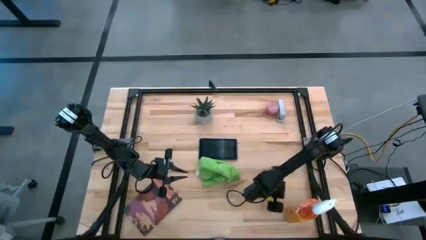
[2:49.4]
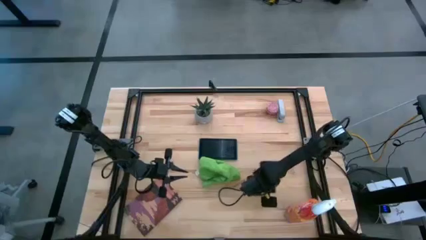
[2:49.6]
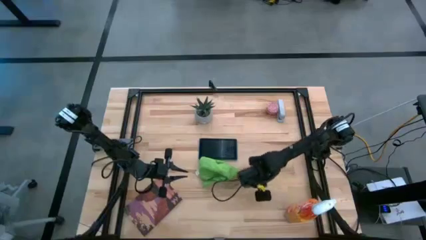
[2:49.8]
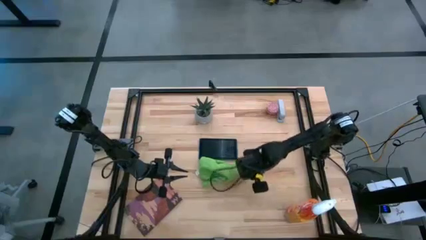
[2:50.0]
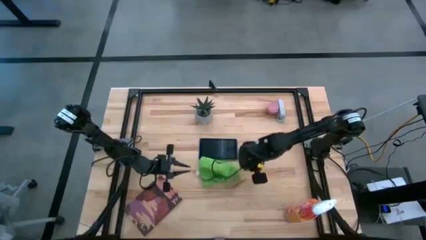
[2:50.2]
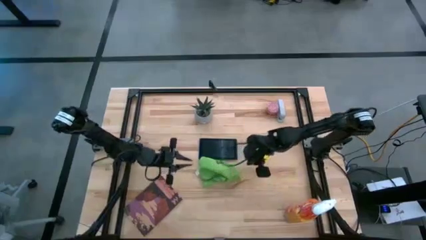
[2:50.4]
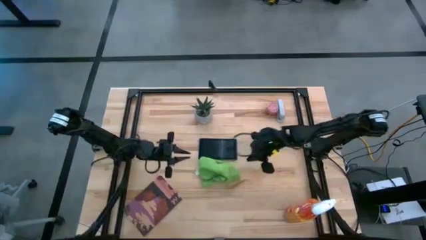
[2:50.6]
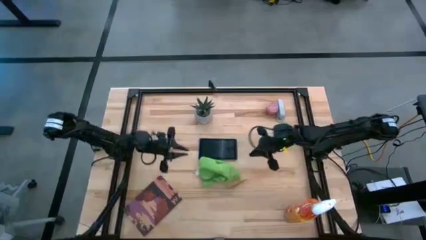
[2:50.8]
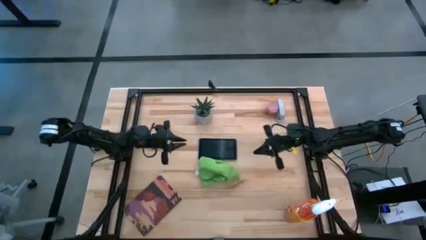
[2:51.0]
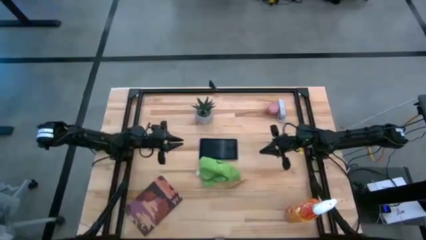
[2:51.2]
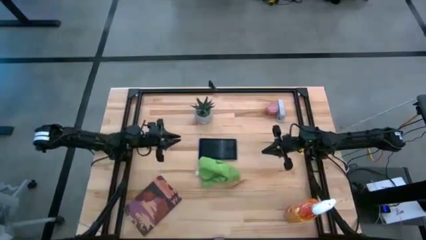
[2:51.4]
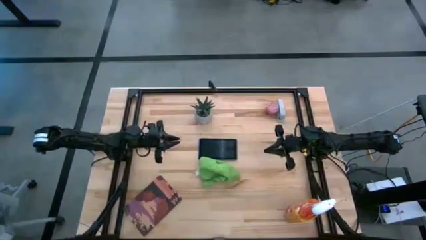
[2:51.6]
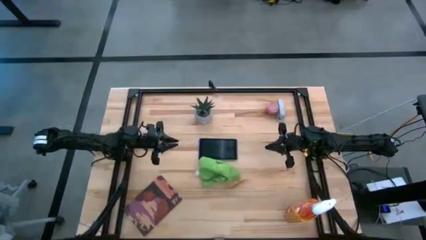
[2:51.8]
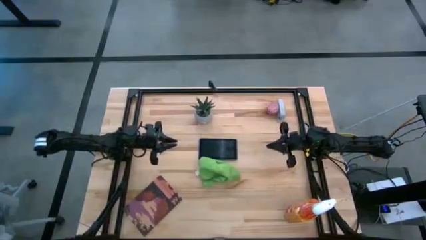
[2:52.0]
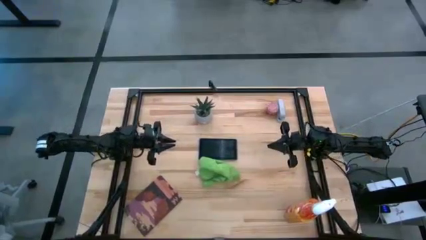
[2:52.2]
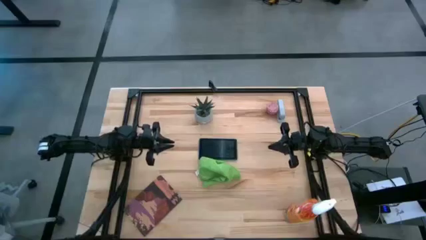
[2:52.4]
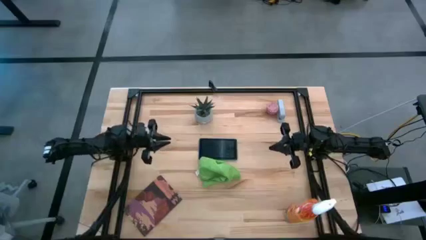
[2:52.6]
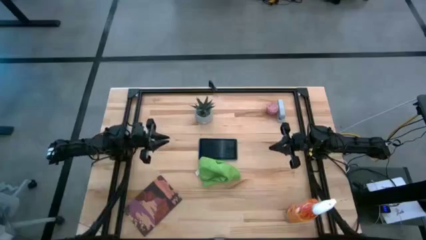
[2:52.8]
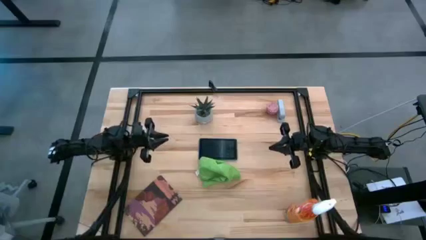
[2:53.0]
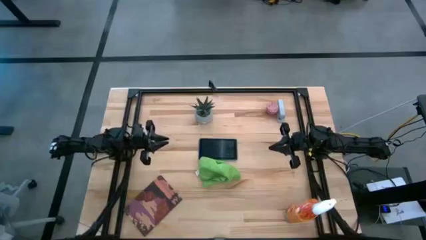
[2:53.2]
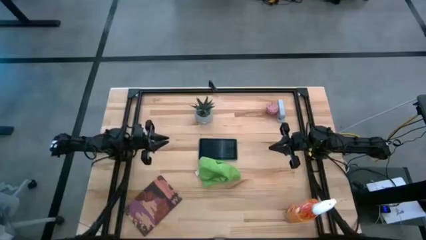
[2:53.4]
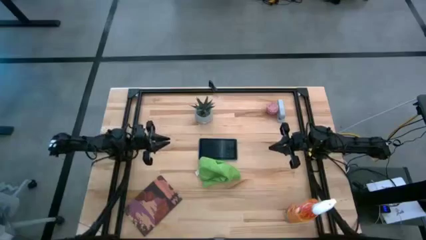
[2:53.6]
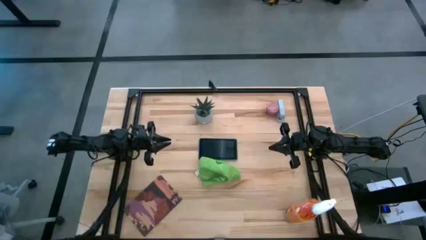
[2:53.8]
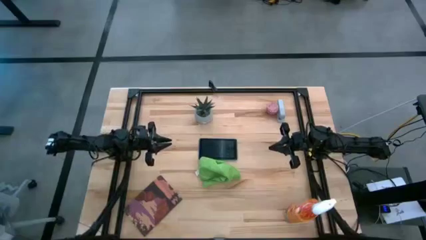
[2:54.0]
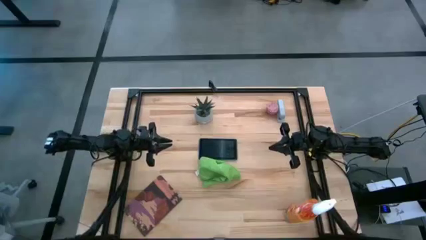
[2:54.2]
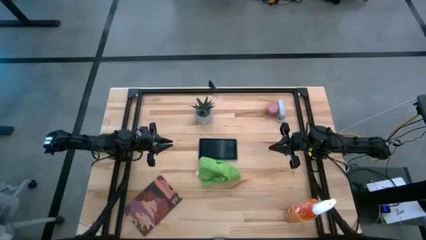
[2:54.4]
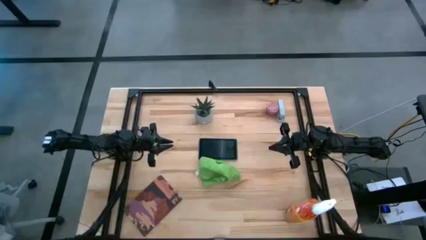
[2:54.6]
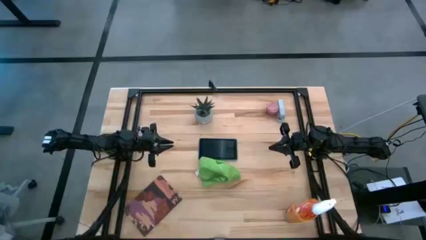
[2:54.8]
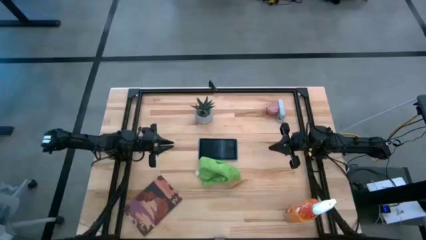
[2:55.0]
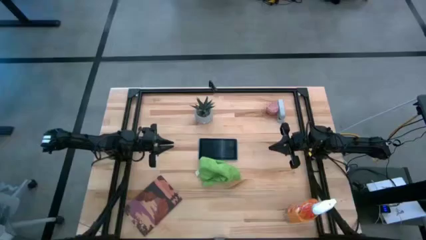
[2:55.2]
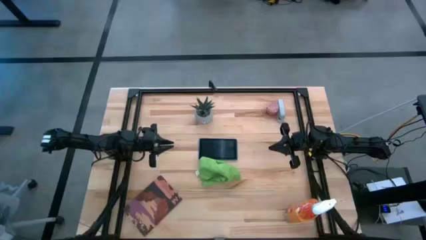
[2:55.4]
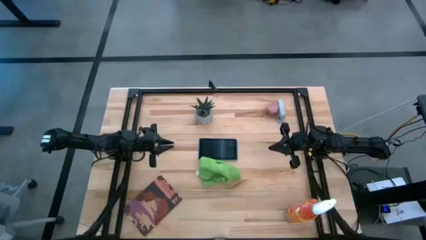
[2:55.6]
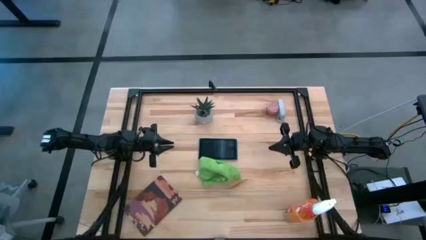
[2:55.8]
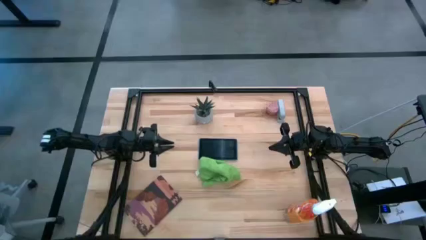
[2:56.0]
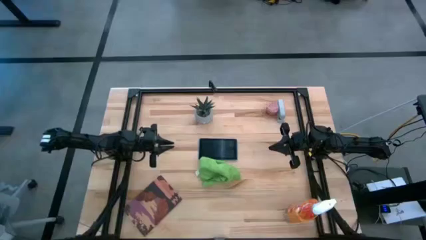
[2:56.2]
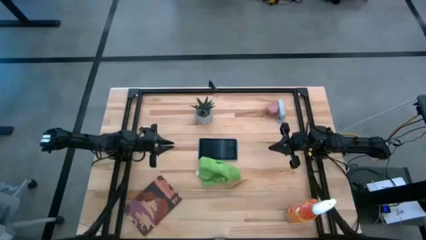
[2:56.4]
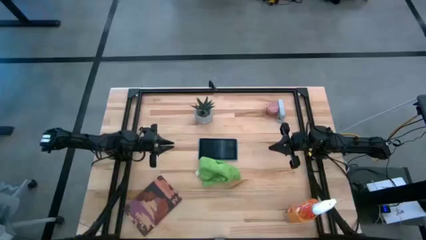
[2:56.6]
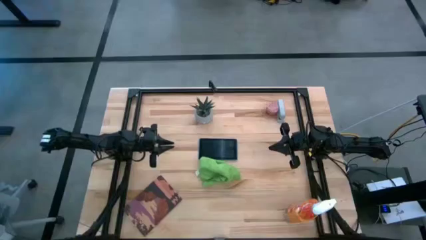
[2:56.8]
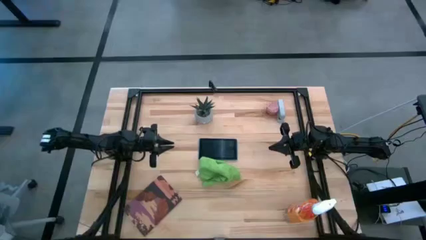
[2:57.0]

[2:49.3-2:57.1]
Task: Apply microfiber cloth
Return to Home Position

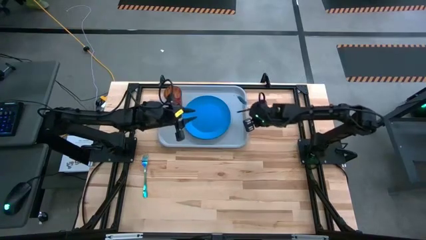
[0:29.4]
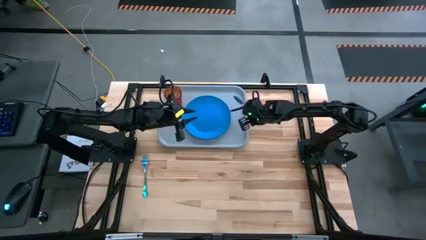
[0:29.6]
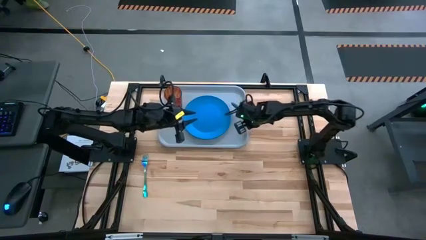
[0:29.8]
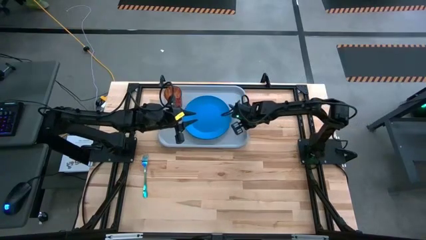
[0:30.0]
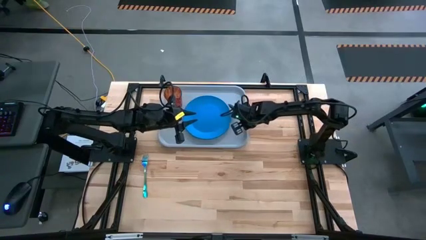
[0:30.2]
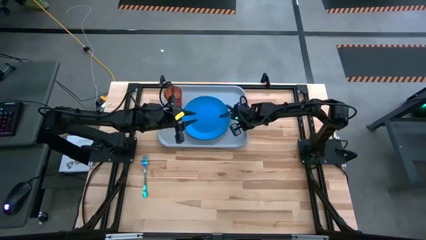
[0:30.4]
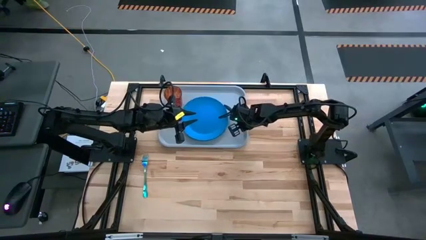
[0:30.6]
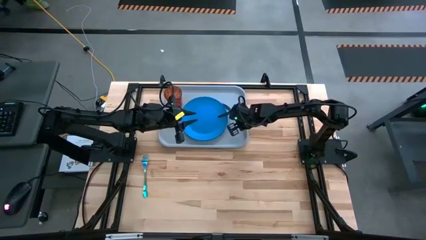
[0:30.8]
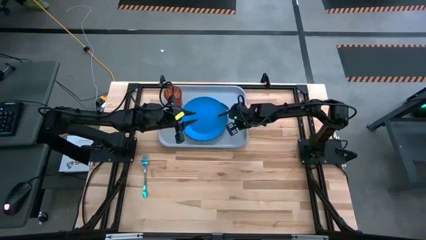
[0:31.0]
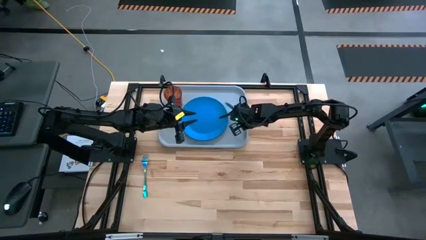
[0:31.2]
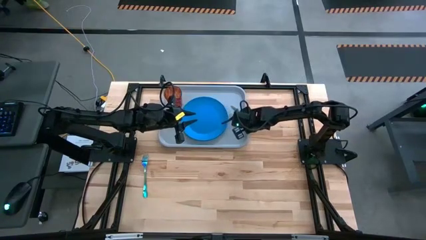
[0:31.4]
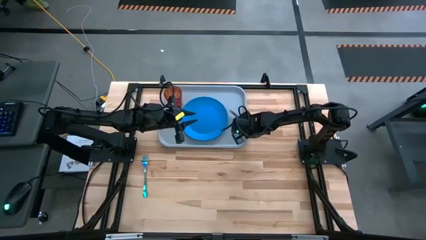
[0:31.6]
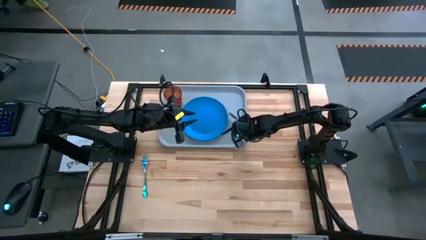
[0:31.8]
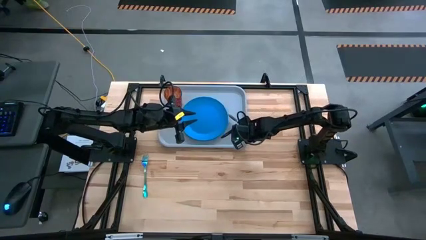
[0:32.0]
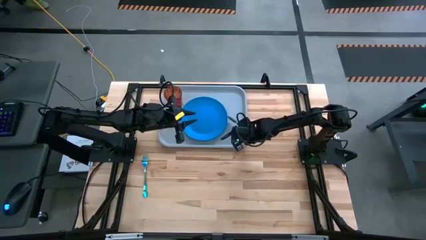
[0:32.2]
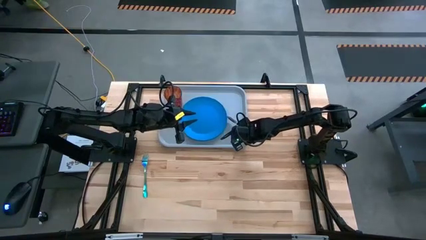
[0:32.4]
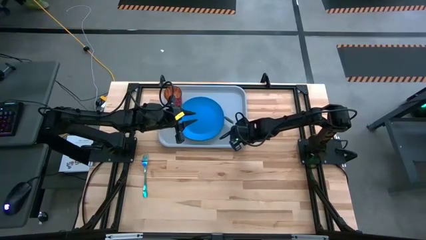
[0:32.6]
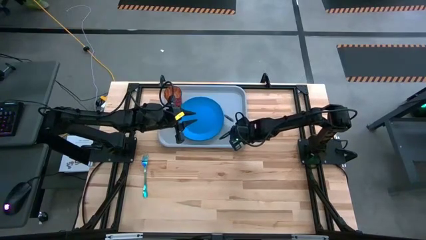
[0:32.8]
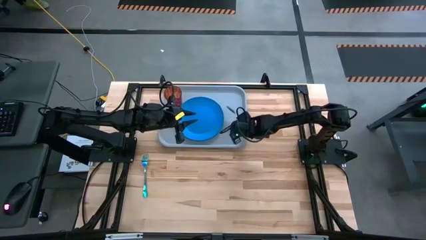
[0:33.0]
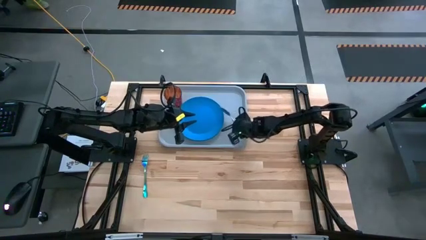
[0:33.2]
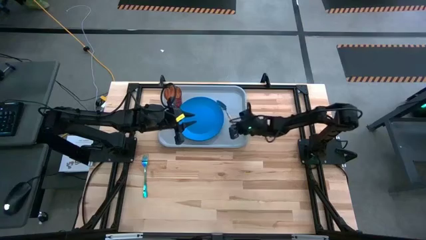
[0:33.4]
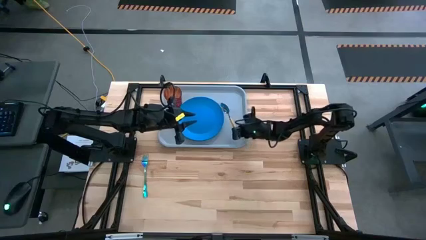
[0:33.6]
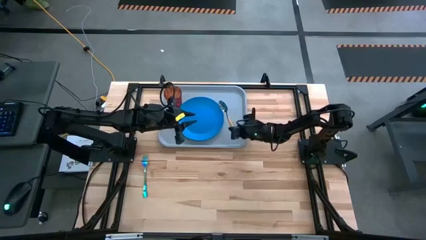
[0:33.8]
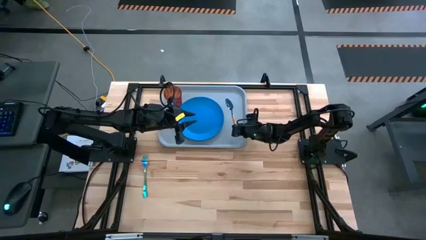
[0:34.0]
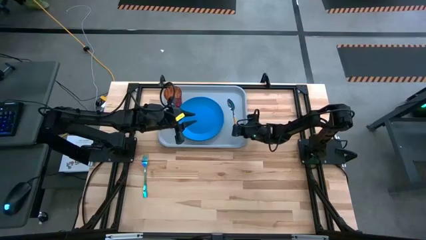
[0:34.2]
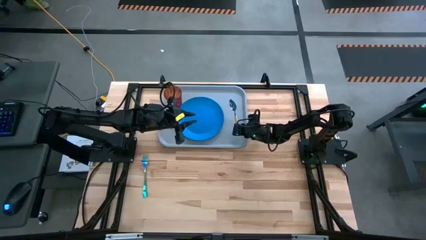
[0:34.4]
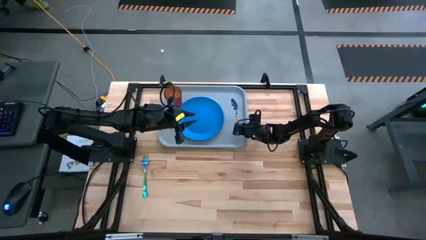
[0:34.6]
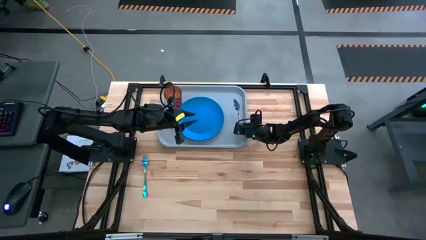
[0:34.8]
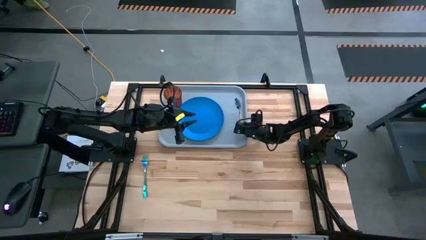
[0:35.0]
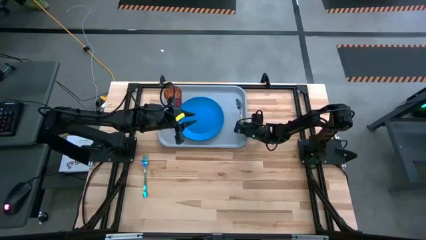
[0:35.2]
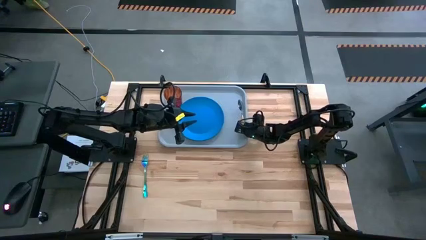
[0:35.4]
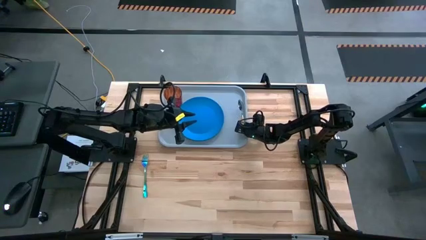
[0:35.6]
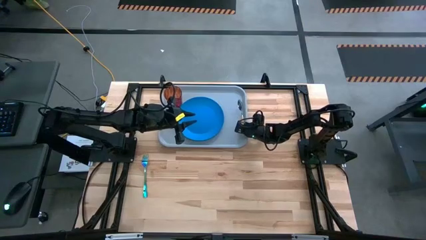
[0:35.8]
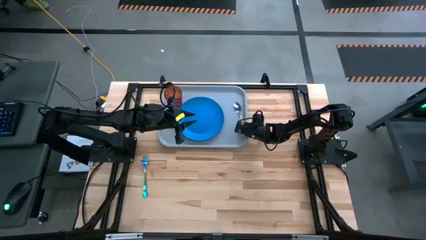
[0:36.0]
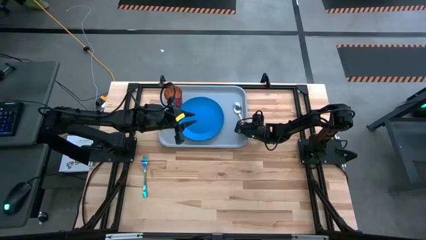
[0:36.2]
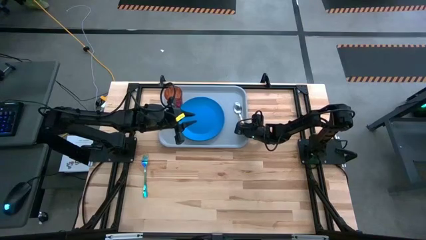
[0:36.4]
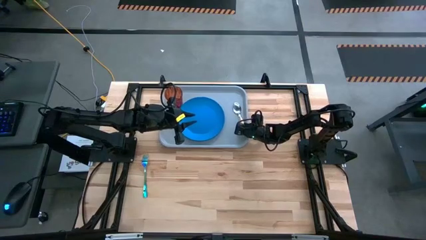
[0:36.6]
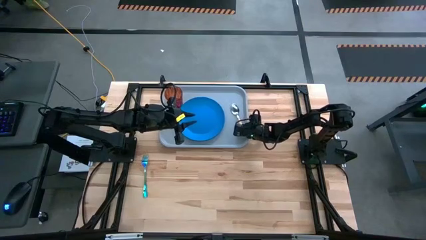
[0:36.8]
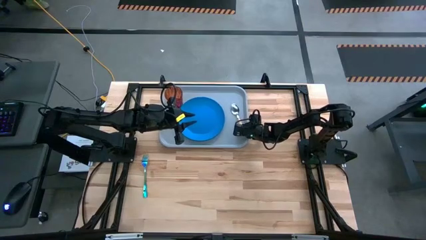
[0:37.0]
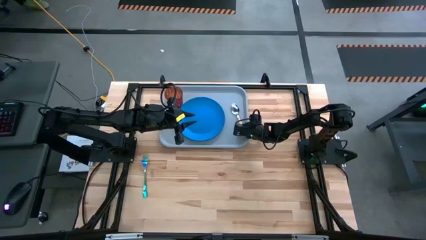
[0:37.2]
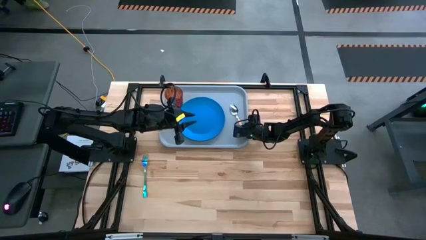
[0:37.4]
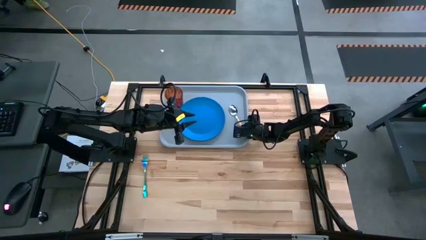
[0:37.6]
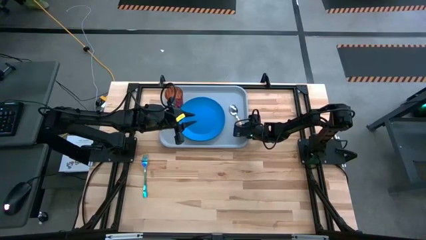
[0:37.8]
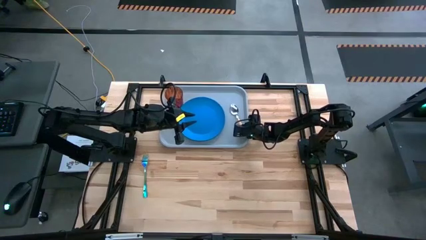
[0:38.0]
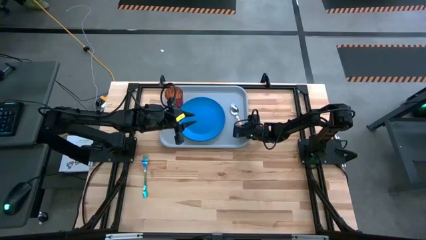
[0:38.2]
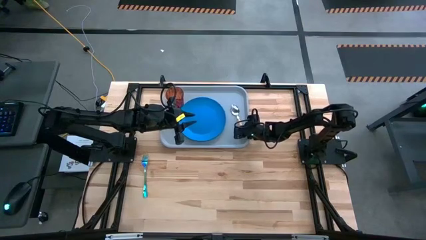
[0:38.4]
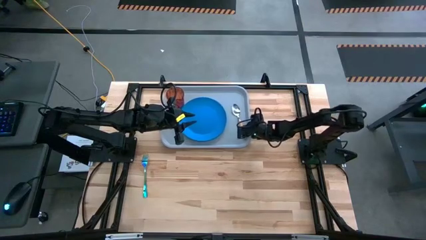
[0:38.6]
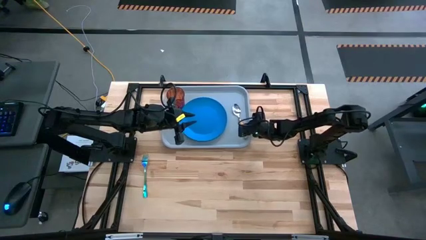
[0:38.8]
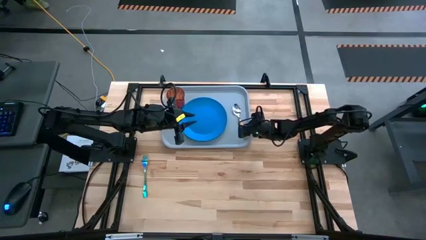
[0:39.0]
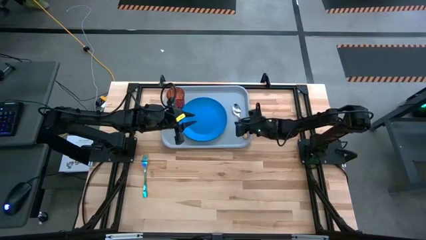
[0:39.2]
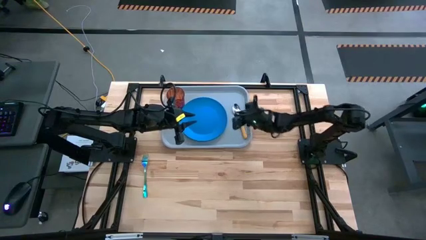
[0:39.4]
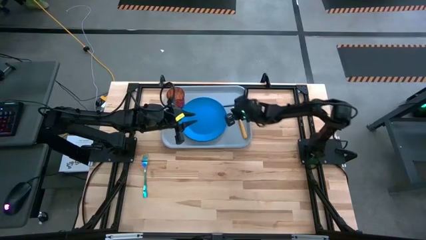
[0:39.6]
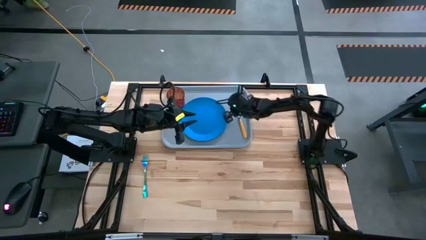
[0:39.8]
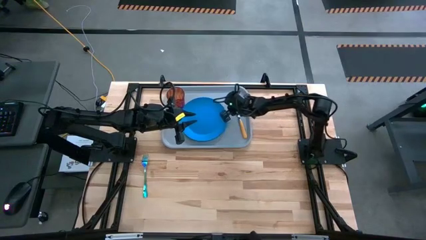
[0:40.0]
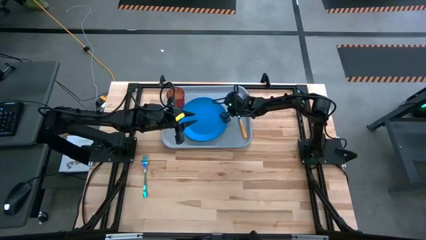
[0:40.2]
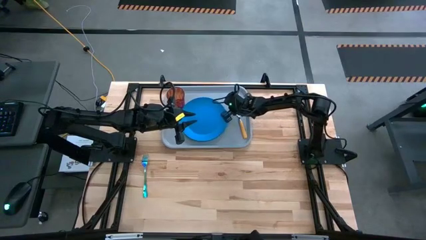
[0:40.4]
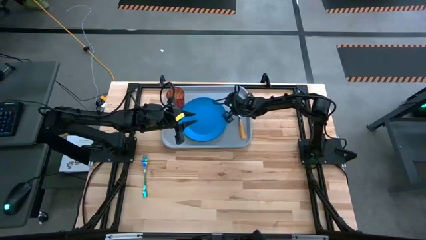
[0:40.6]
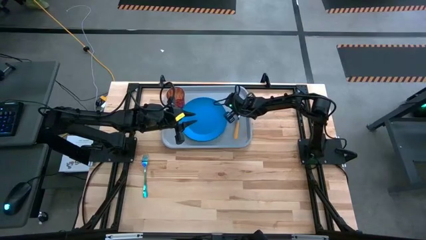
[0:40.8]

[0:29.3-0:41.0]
Task: Pick and place plate/cup/fork/spoon on tray
Put the yellow spoon on the gray serving tray to the right of the blue plate
